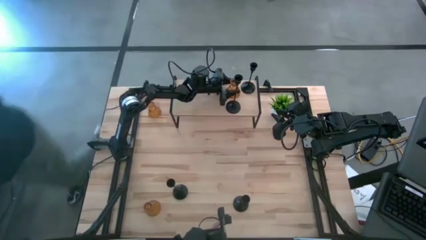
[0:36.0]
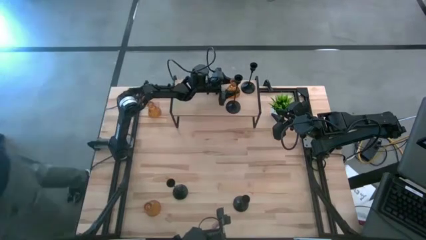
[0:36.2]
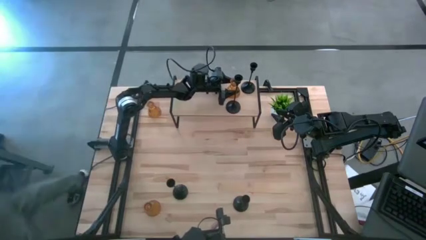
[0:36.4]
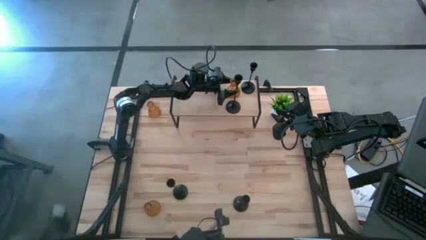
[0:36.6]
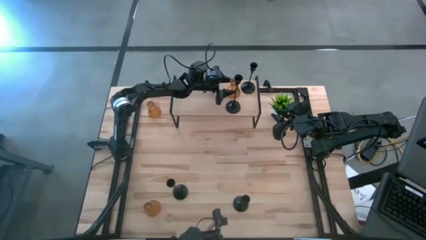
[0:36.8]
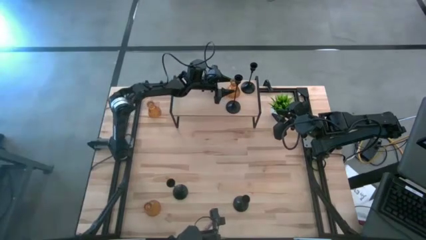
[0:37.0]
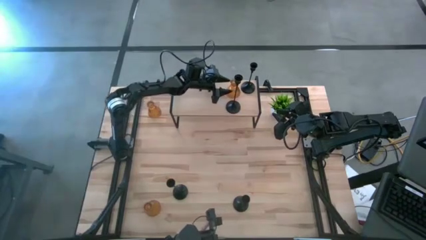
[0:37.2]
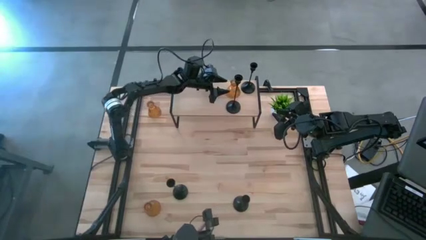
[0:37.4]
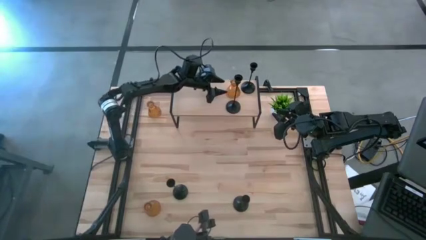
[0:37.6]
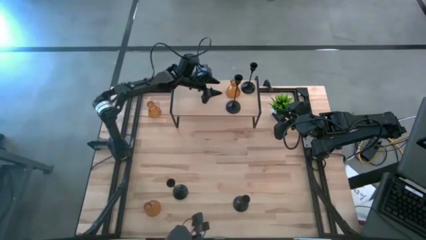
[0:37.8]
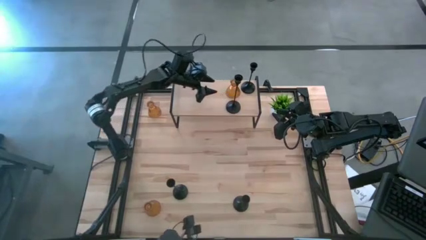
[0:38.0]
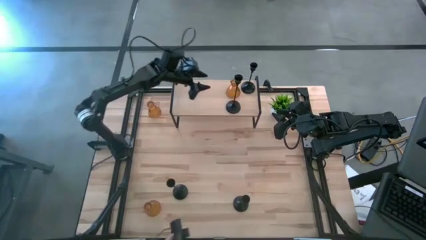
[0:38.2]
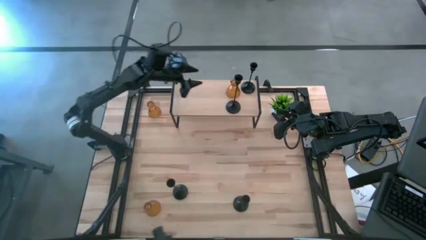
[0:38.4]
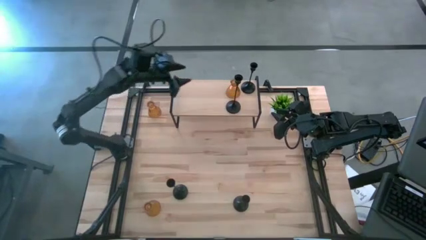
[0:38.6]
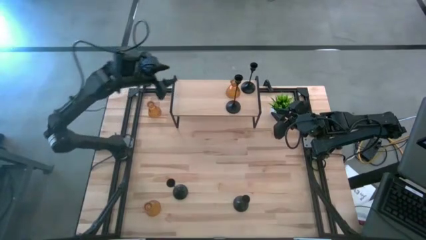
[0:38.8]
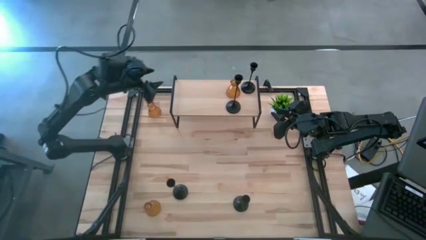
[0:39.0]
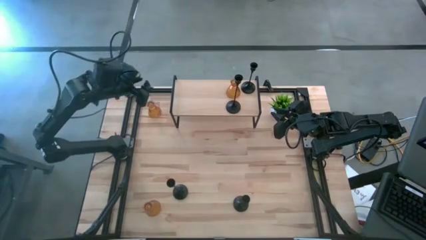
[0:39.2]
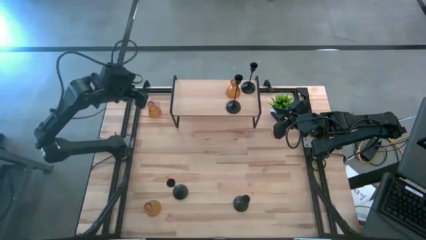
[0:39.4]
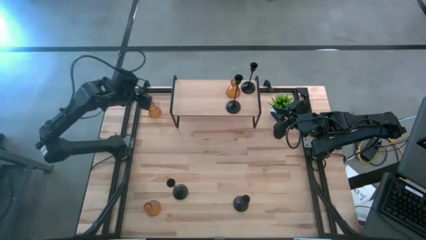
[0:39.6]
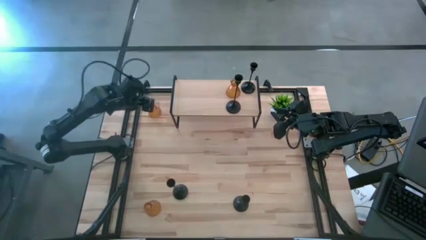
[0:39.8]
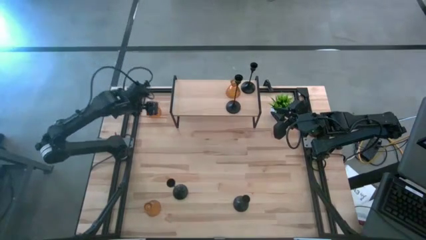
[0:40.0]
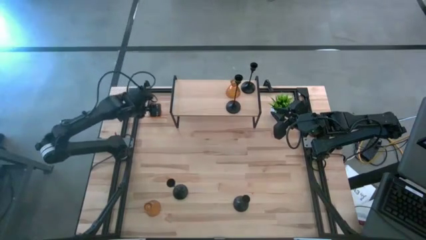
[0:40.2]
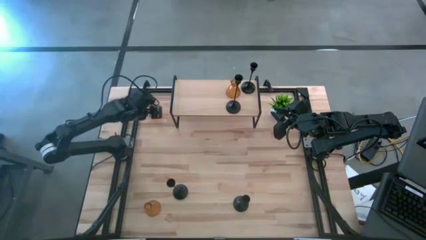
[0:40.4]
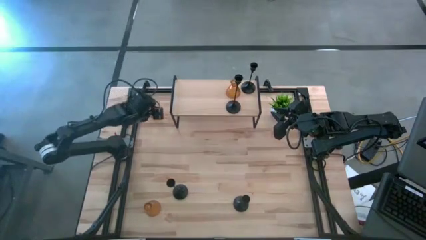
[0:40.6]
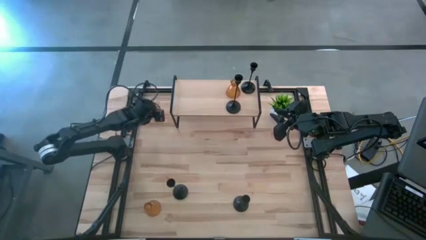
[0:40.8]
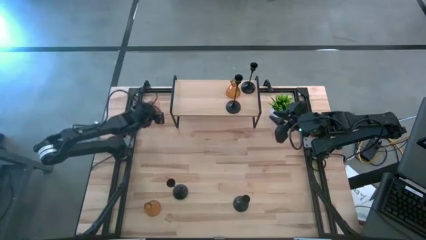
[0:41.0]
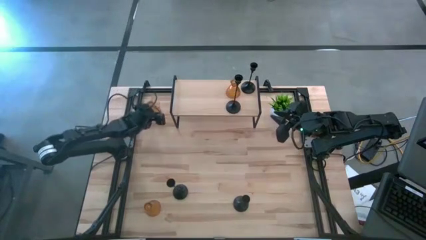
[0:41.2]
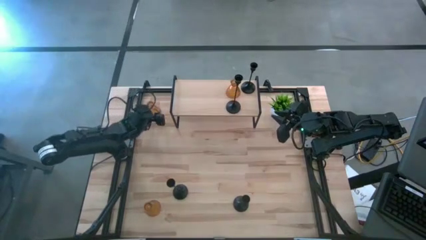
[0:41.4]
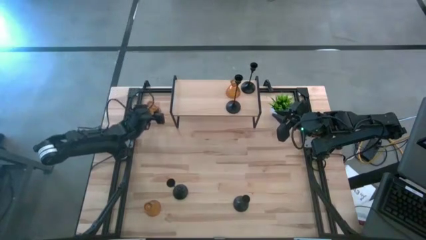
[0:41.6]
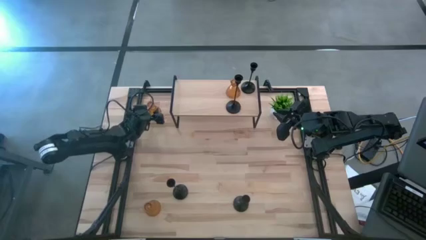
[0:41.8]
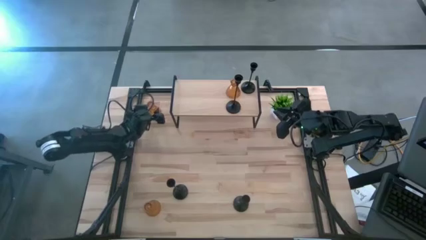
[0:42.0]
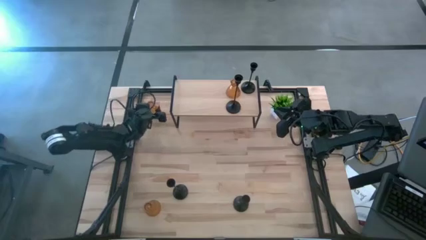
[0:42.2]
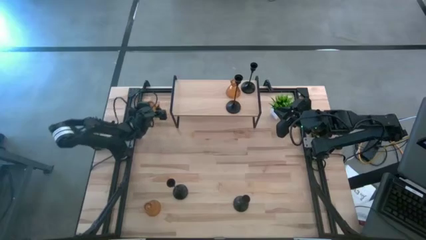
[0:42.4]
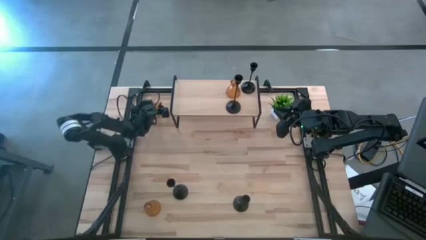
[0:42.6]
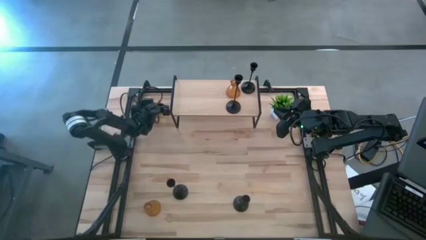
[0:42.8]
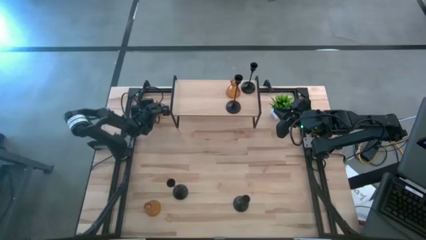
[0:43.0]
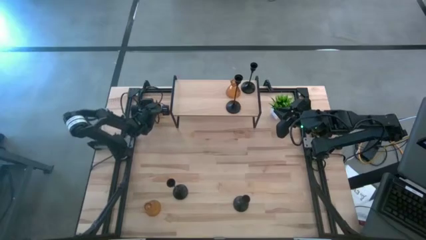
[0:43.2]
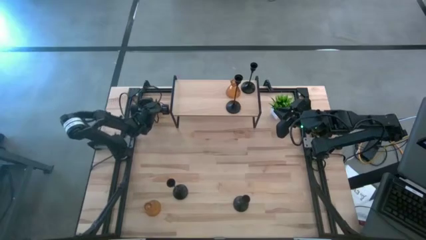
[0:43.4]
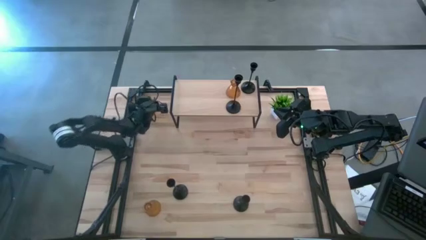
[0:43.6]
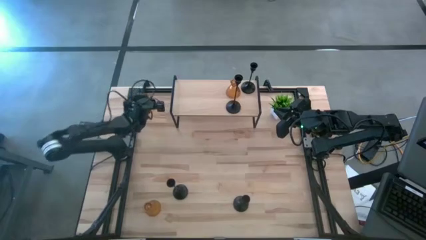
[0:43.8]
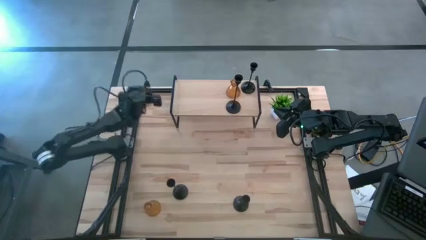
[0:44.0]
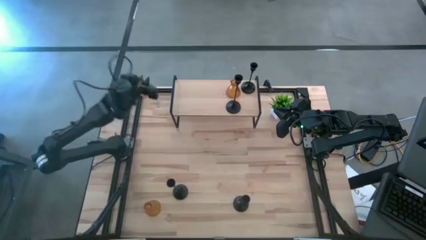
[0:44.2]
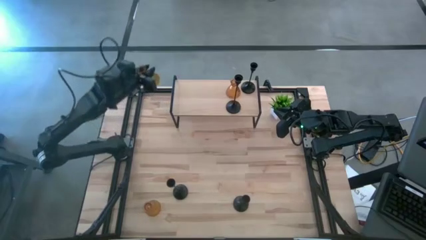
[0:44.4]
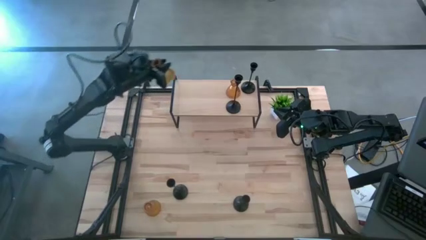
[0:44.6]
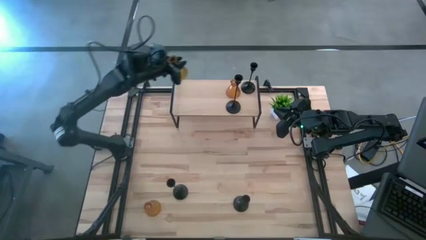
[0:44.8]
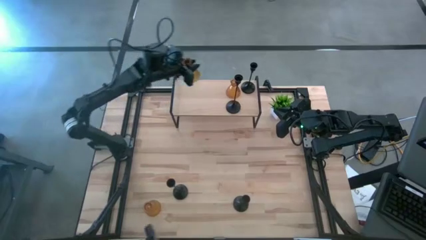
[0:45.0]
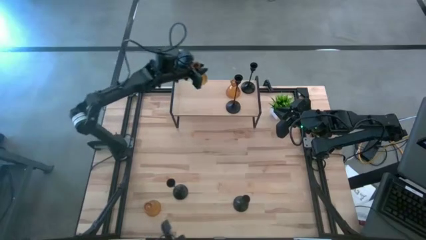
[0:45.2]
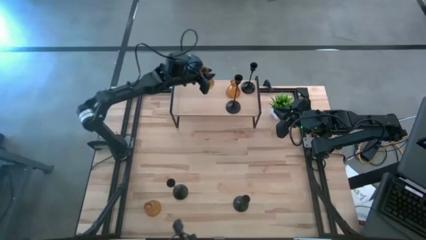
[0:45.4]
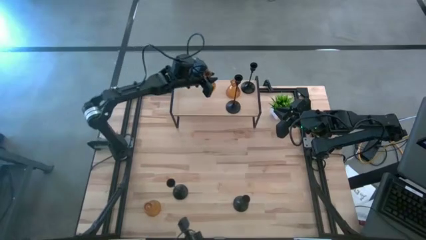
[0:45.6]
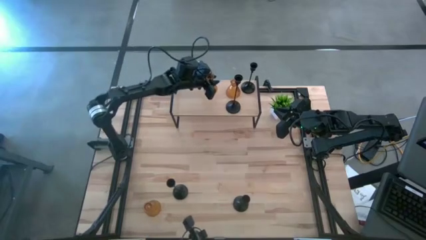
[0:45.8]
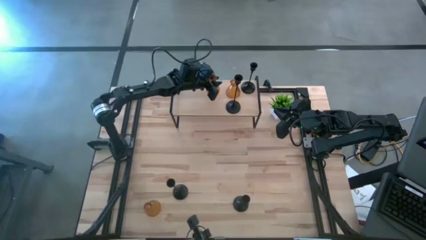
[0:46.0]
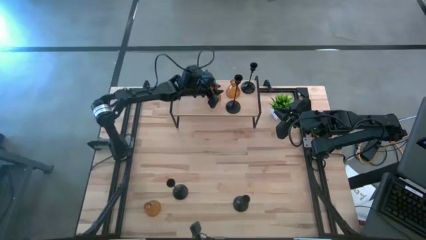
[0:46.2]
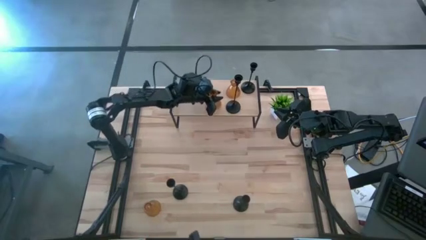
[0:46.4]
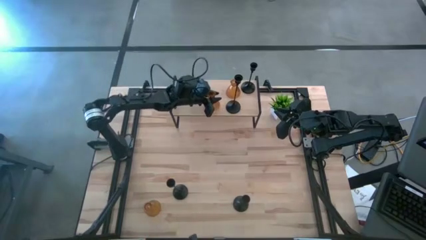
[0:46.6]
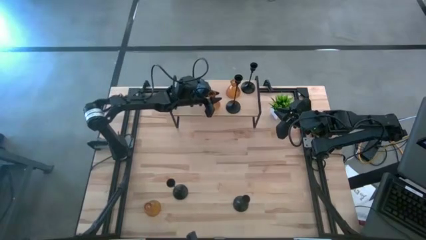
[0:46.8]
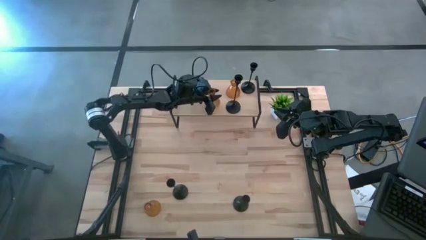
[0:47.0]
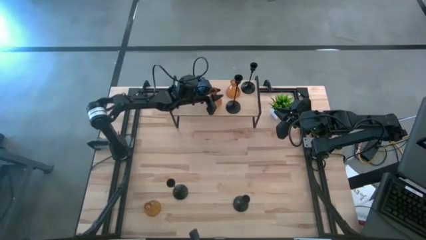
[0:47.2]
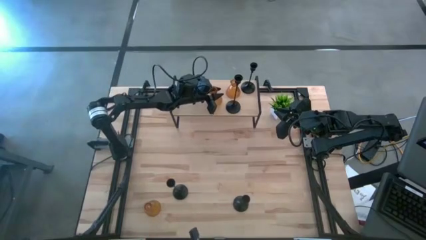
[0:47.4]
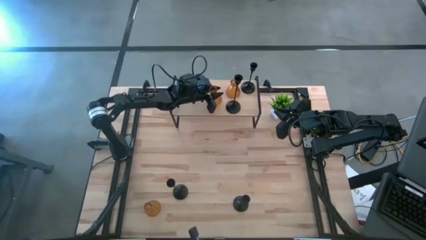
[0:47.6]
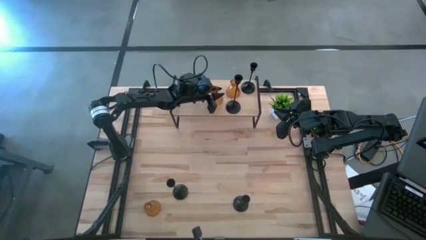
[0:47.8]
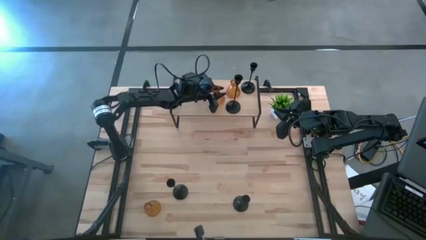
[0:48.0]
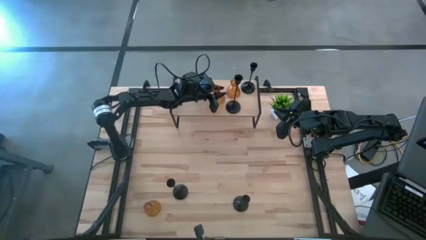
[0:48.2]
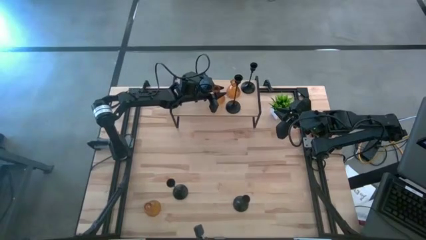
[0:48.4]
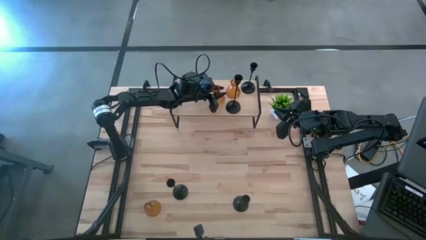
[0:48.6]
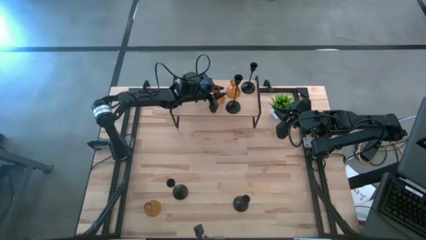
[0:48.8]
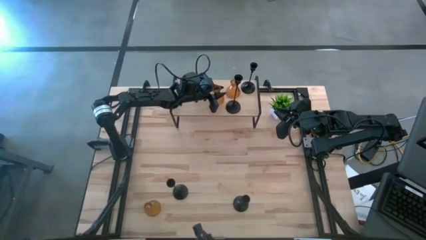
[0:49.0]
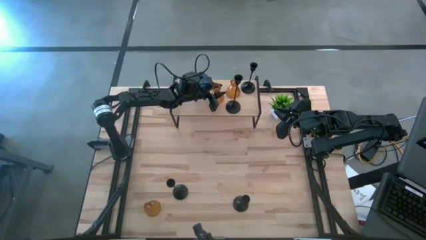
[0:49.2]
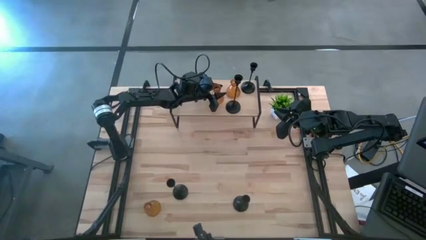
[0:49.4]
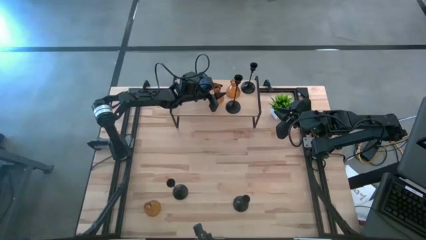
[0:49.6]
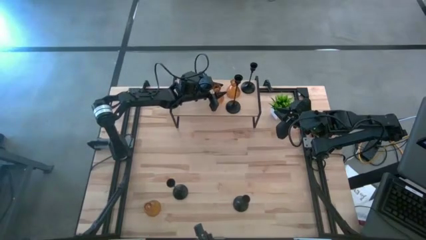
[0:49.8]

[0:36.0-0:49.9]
Task: Pick & Place candle stick holders
Put the top yellow glass candle holder on the shelf
